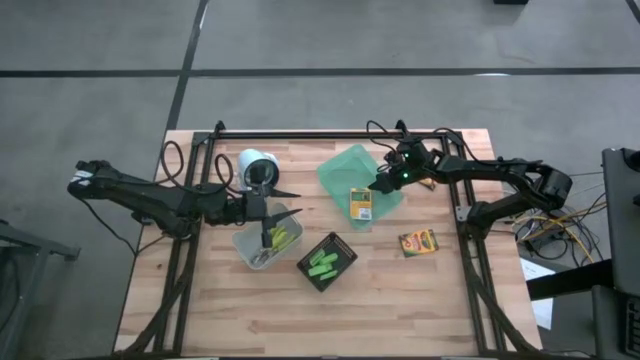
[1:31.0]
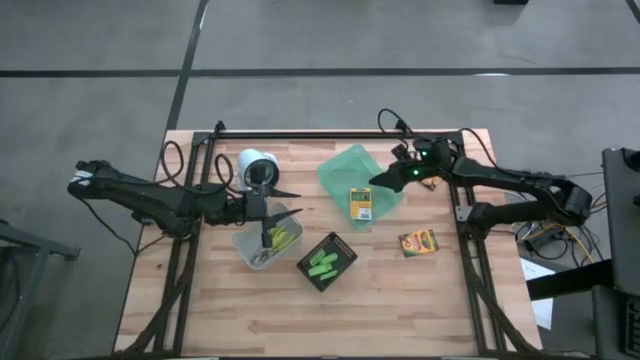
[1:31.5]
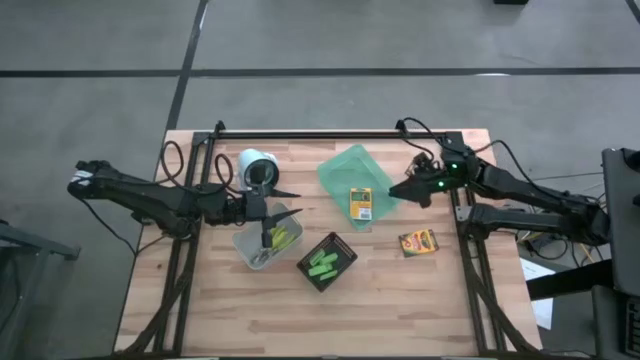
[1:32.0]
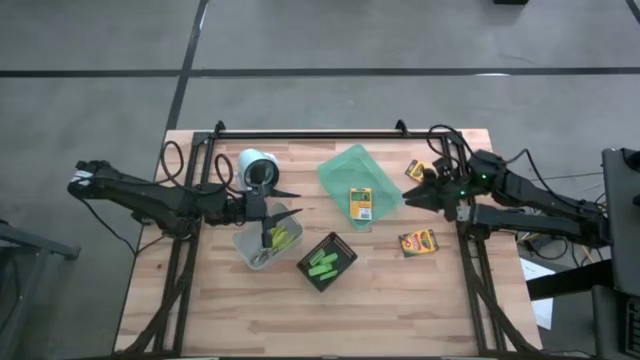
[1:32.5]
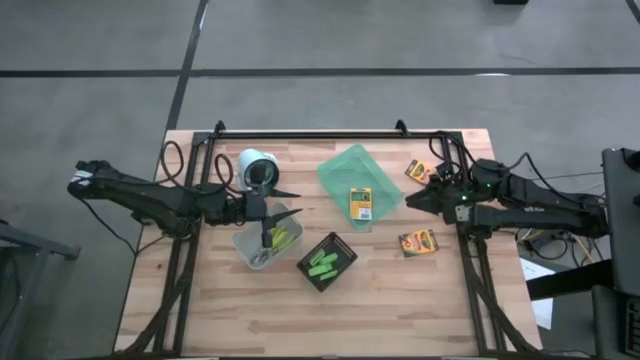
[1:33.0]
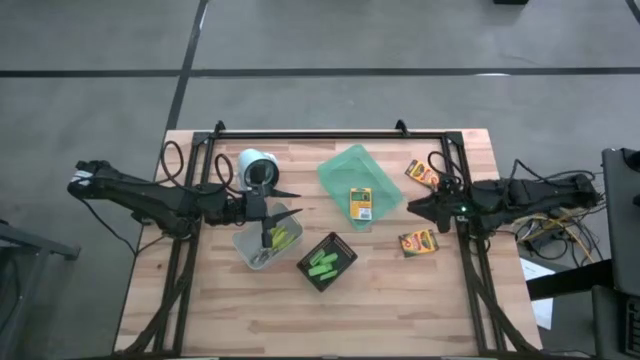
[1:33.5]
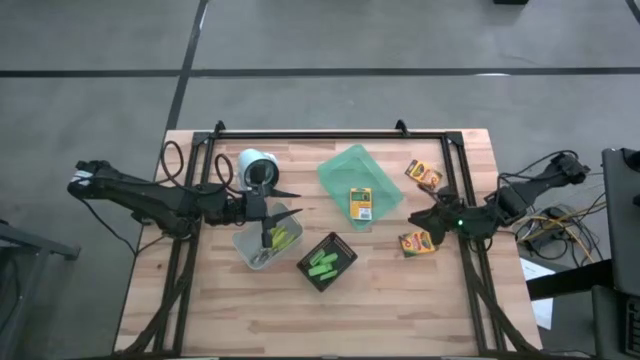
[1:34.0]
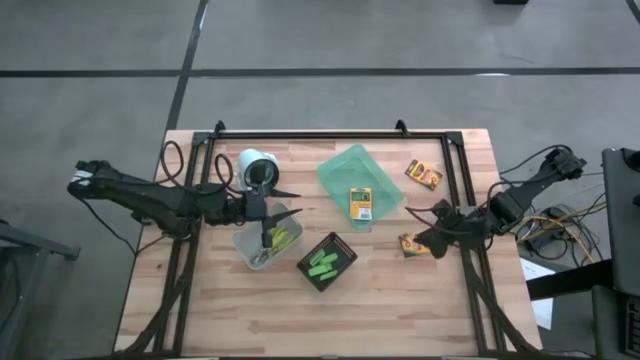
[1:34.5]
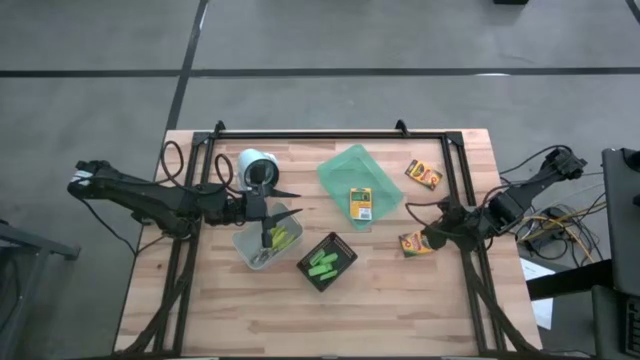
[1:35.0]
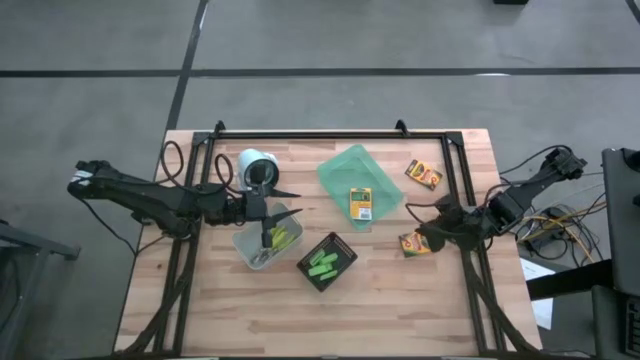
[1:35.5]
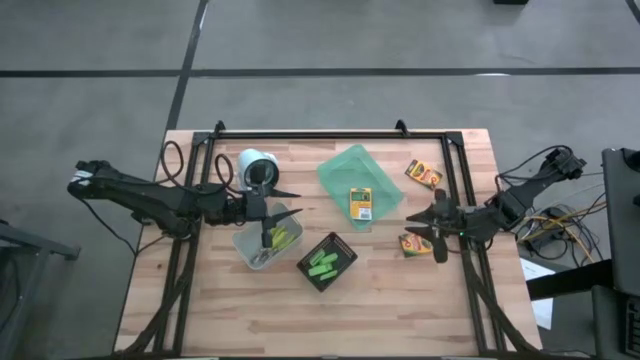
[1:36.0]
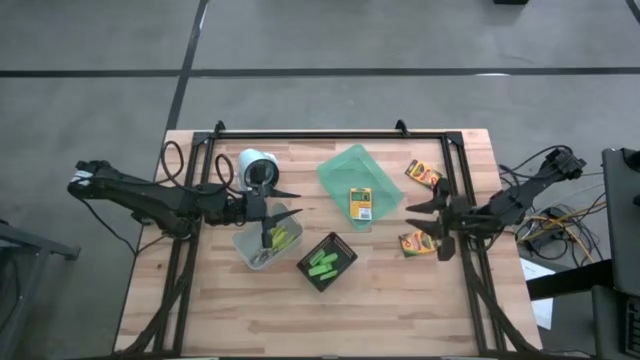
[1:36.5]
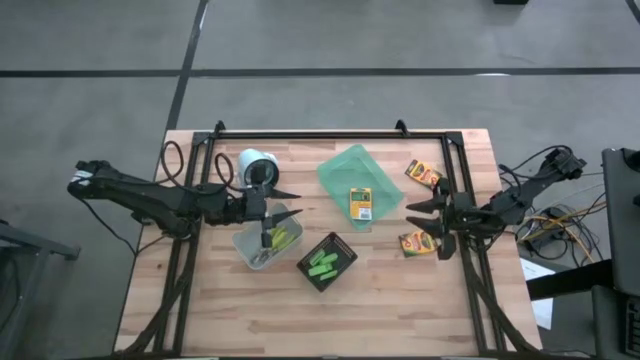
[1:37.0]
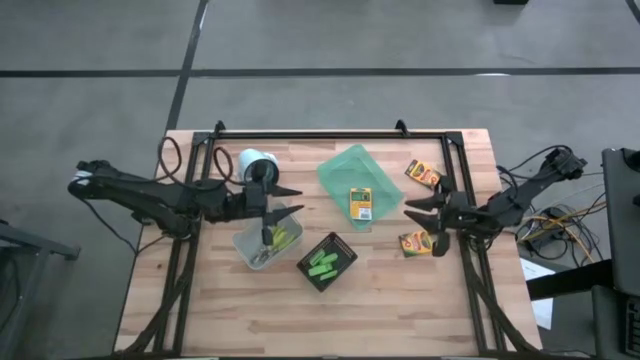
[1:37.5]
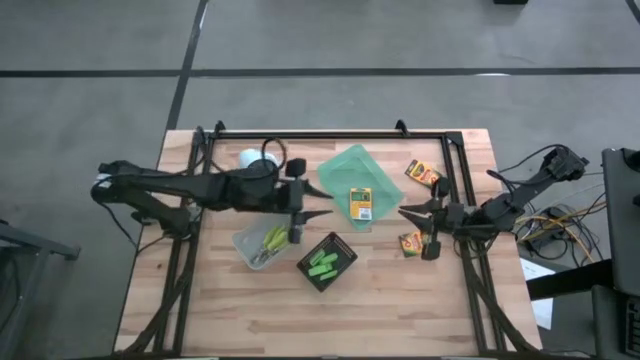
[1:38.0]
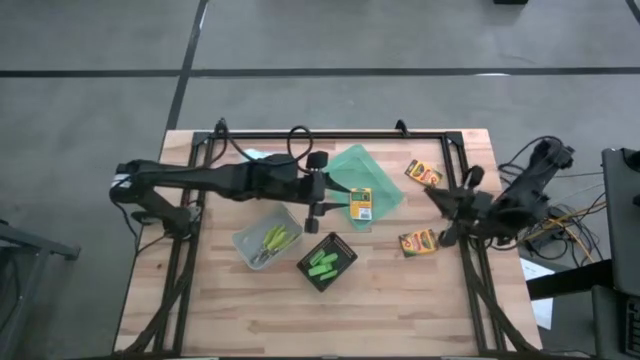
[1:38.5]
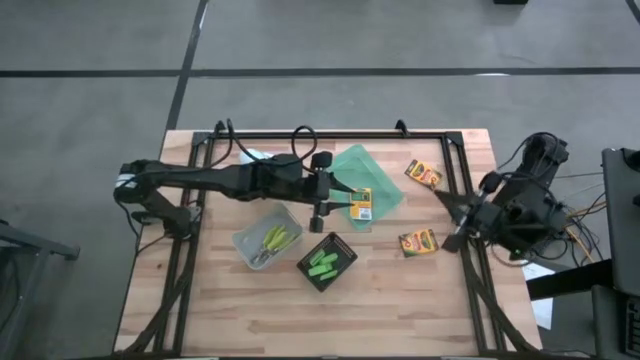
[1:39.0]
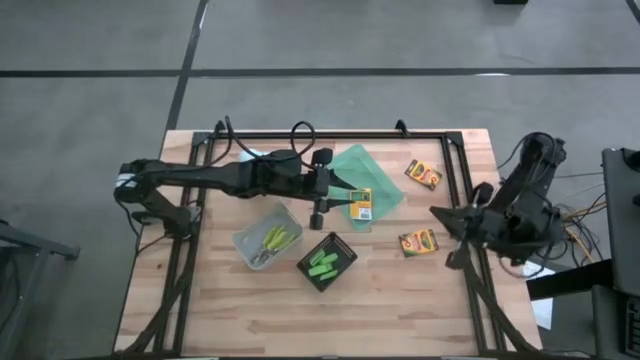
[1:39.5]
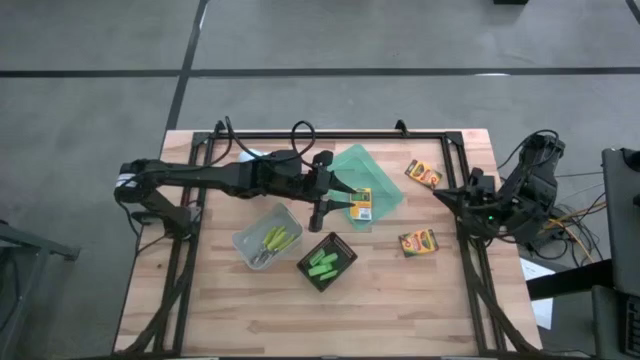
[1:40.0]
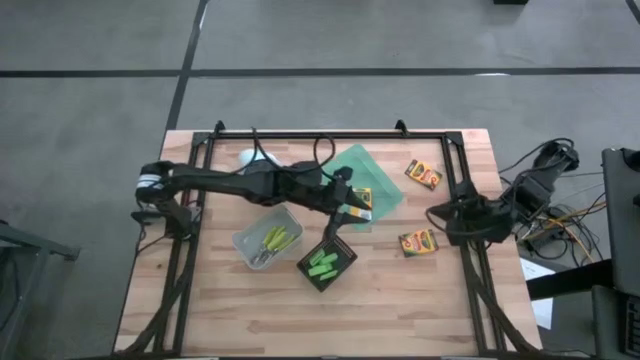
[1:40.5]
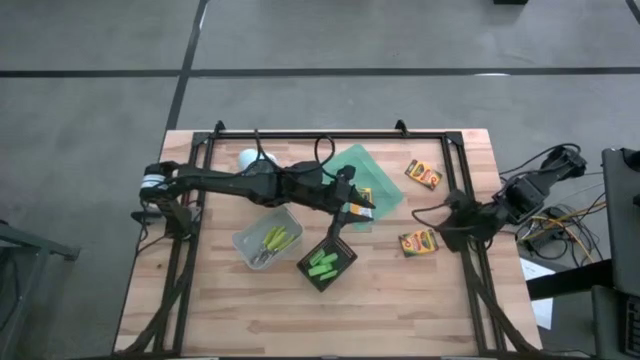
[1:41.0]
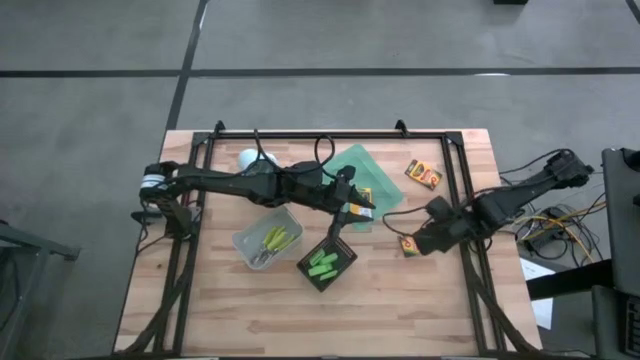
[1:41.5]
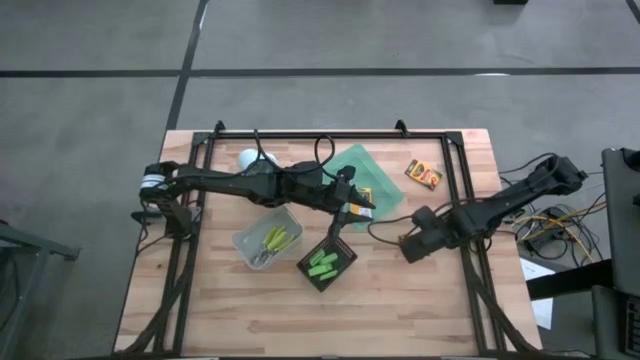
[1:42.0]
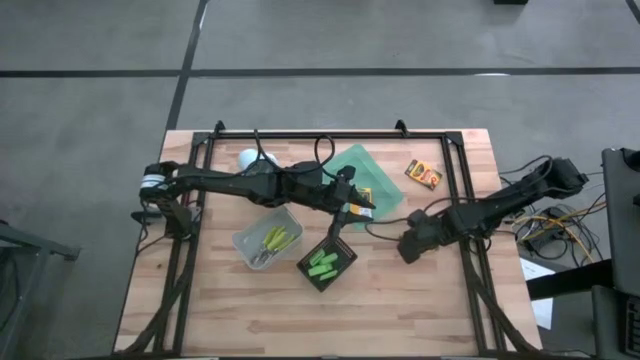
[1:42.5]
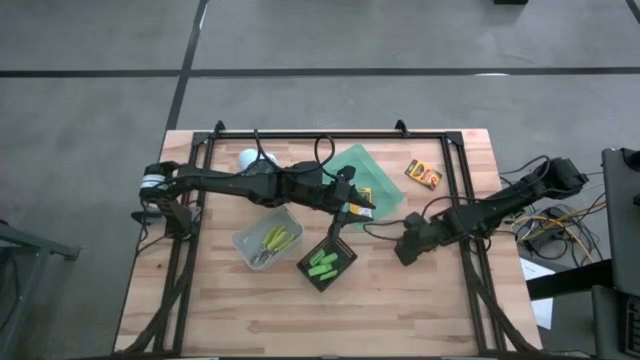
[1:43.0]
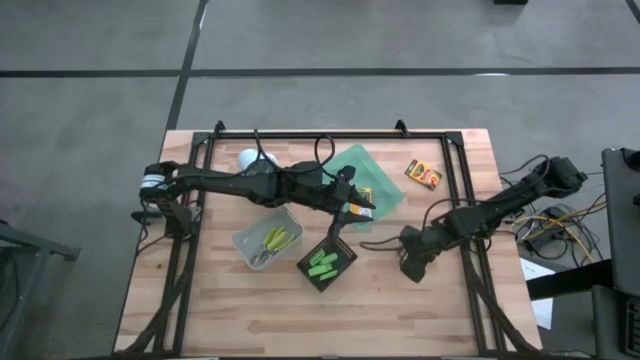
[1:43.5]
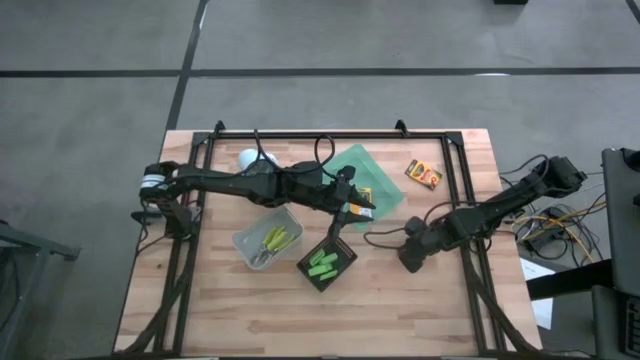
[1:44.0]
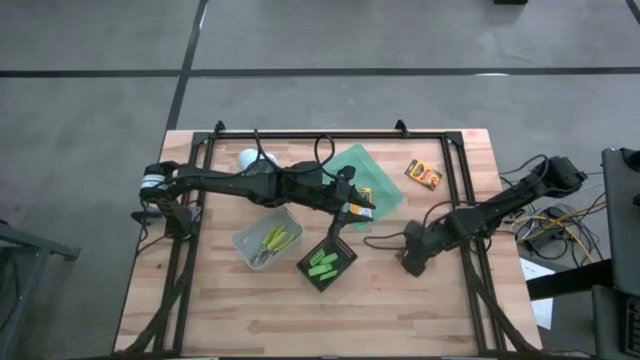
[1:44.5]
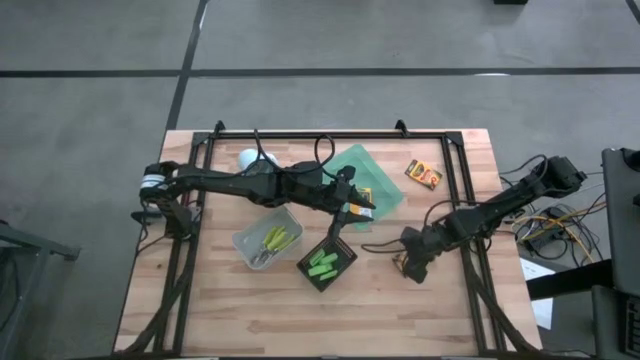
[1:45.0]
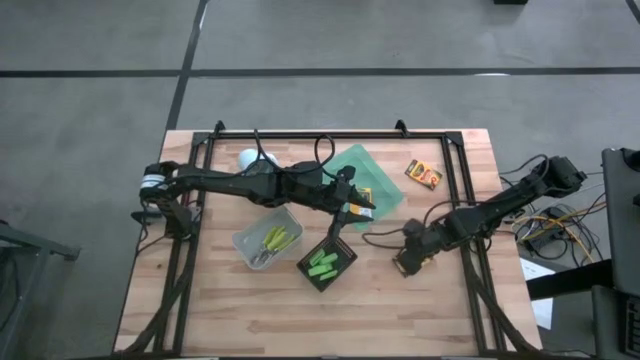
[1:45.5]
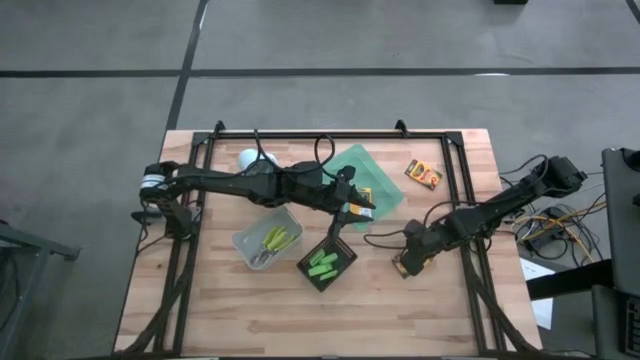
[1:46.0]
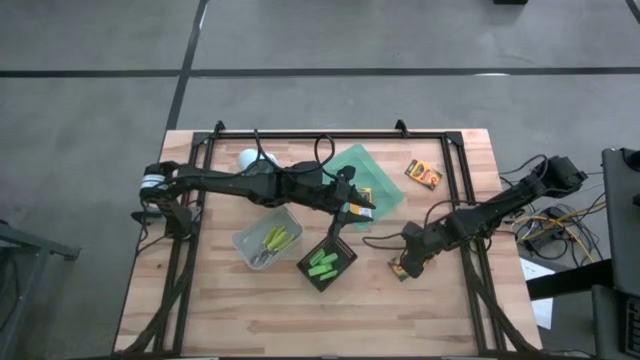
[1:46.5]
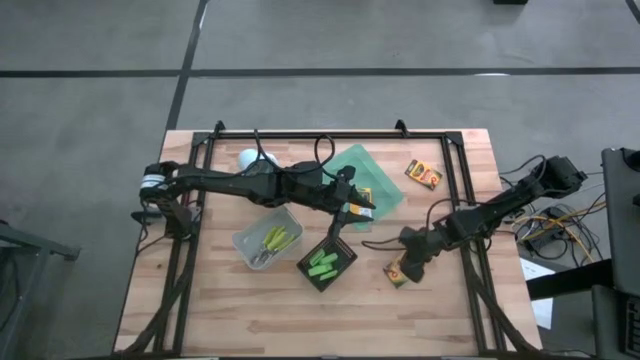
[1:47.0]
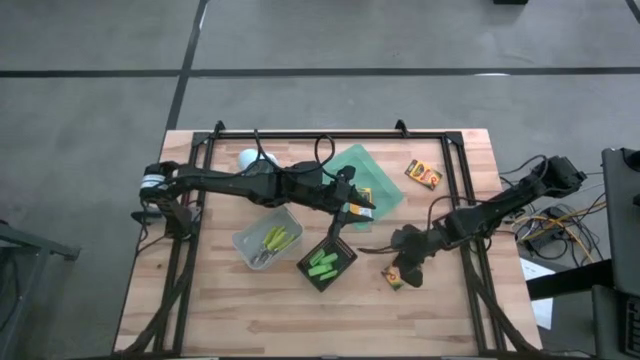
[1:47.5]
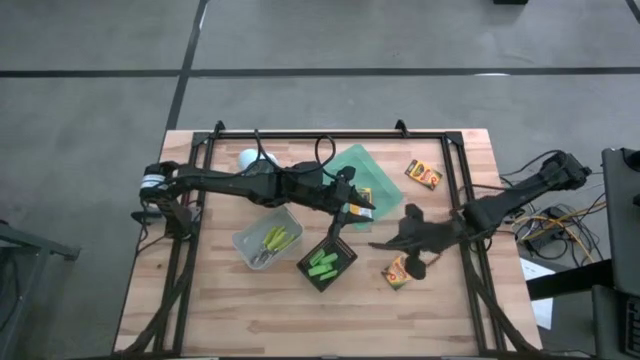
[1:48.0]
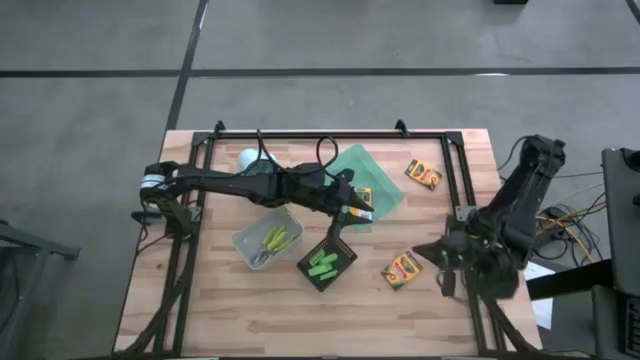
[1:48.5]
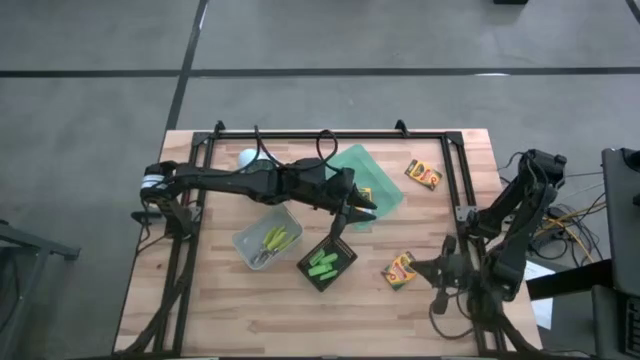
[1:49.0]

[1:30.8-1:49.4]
Task: Pick & Place School Supplies
Put the crayon box into the light green bin
